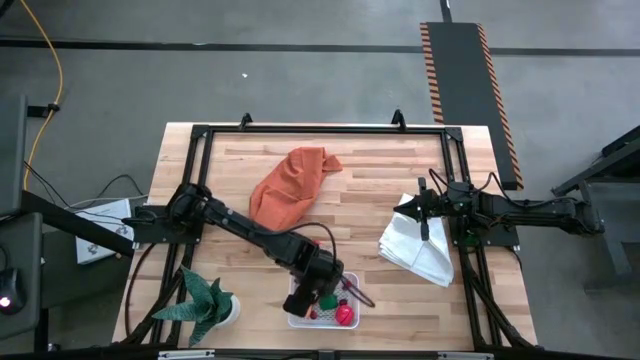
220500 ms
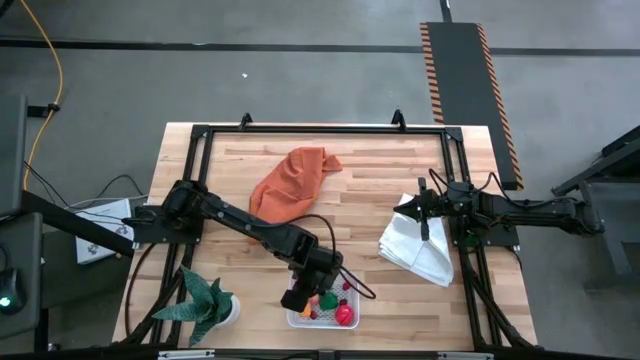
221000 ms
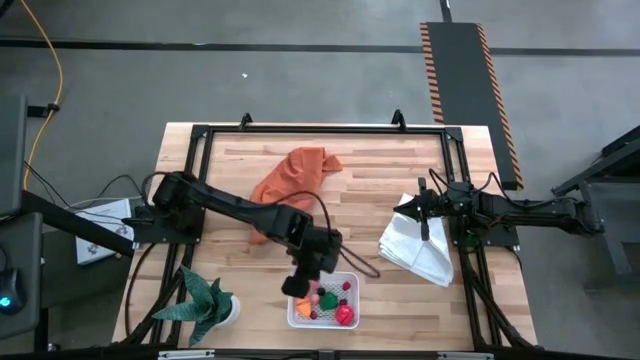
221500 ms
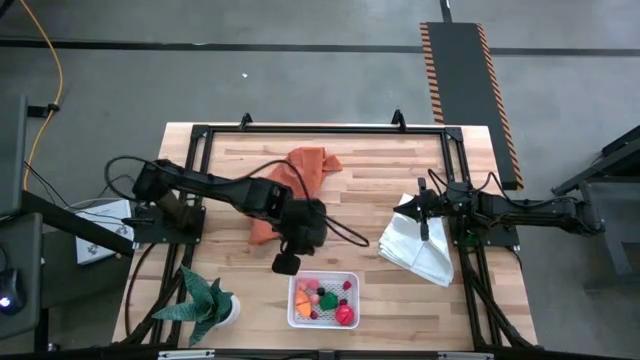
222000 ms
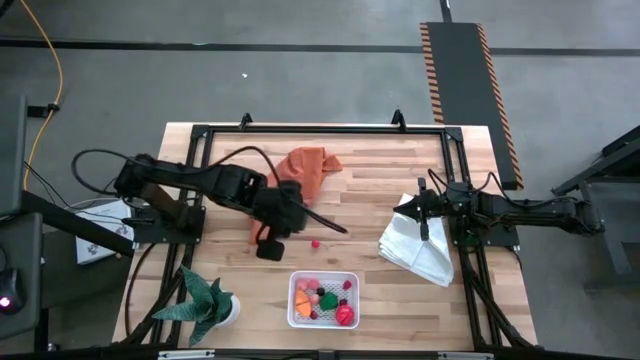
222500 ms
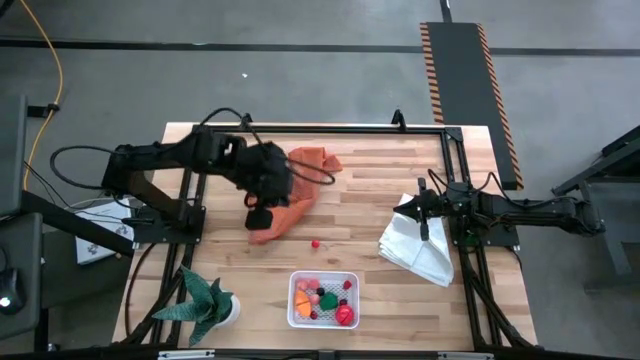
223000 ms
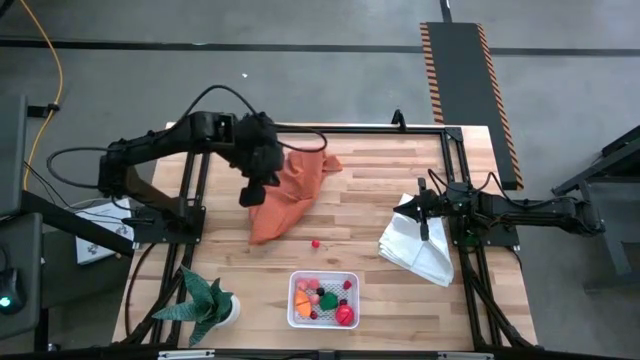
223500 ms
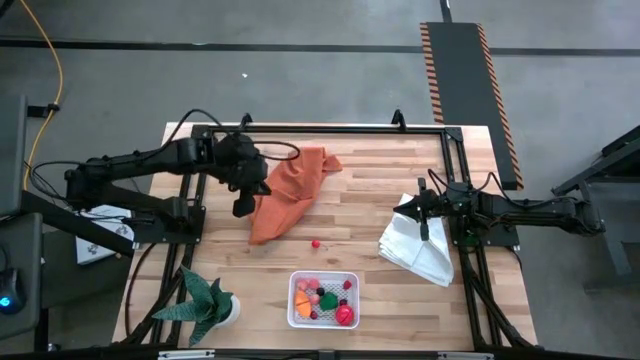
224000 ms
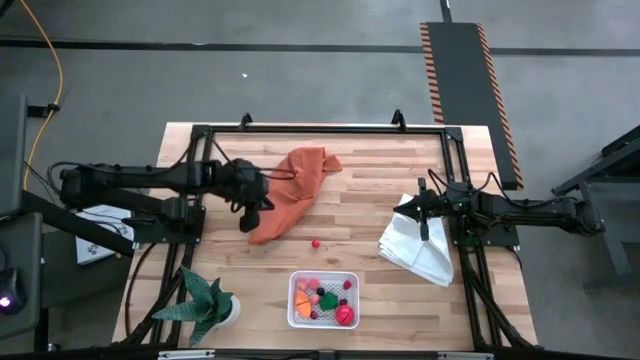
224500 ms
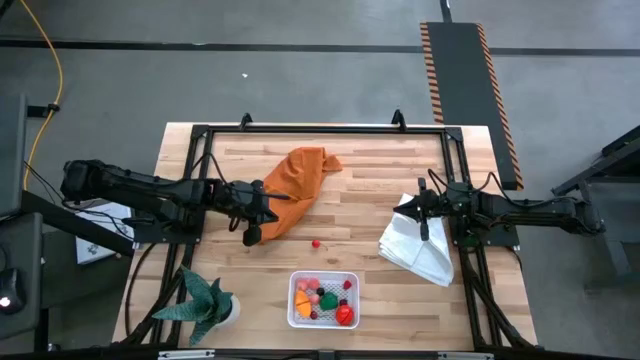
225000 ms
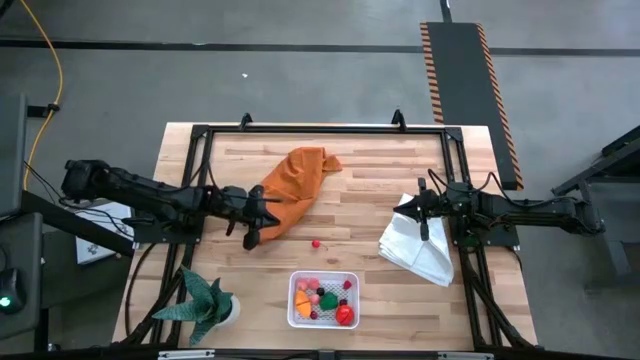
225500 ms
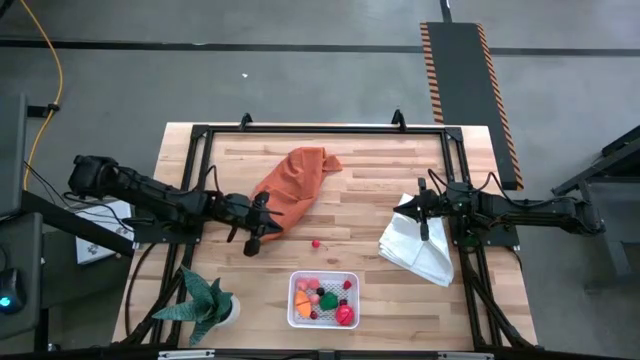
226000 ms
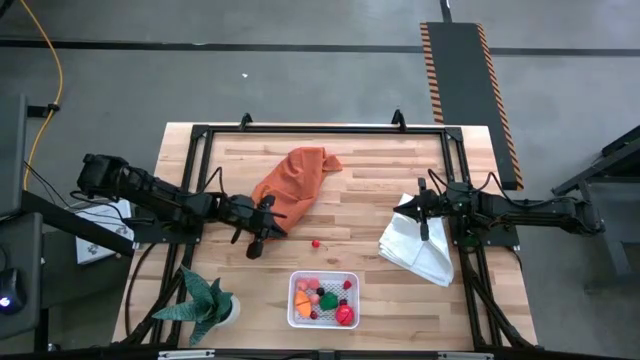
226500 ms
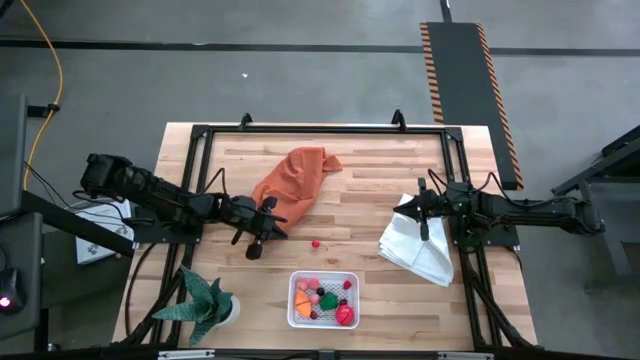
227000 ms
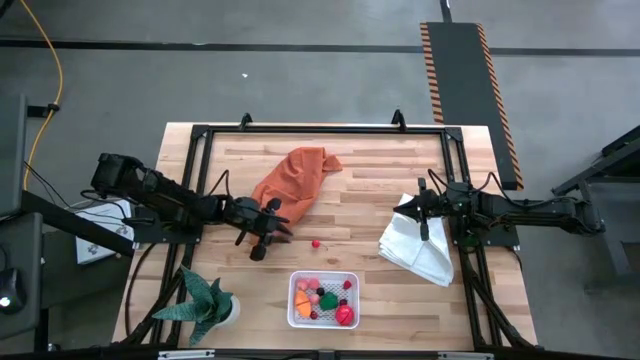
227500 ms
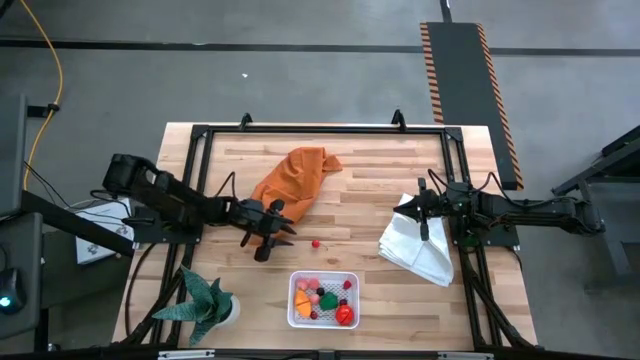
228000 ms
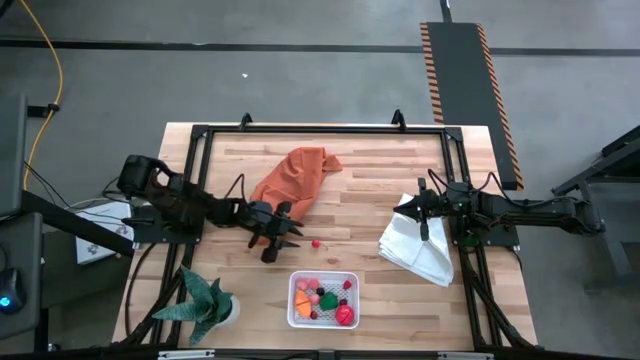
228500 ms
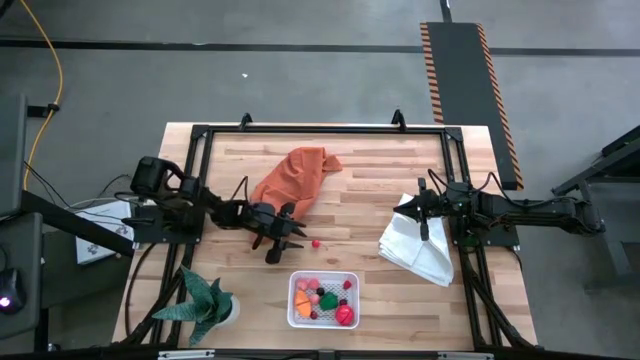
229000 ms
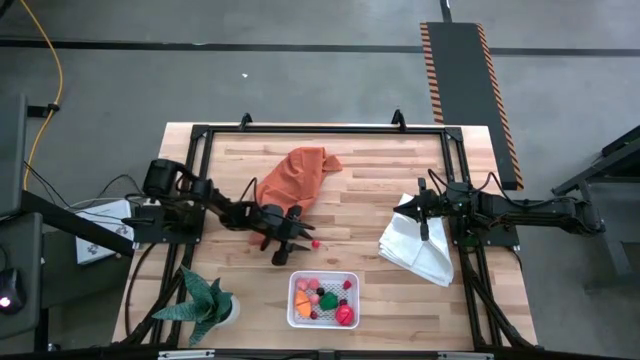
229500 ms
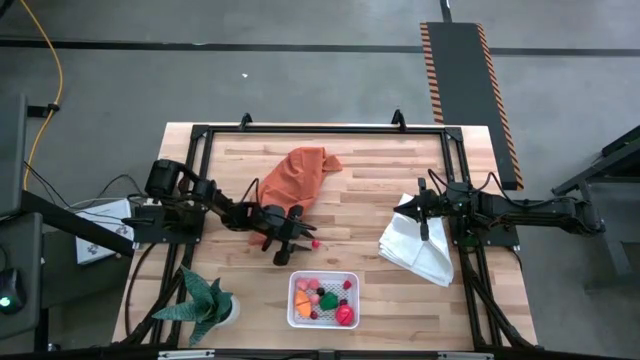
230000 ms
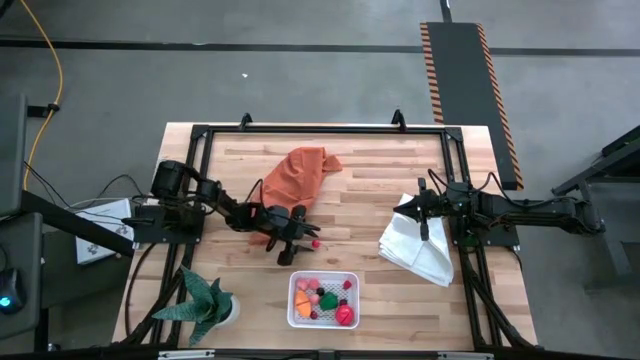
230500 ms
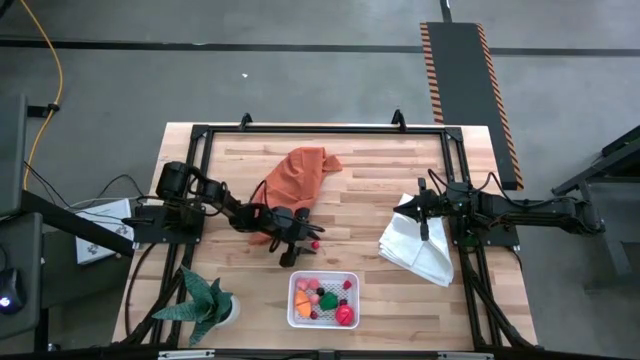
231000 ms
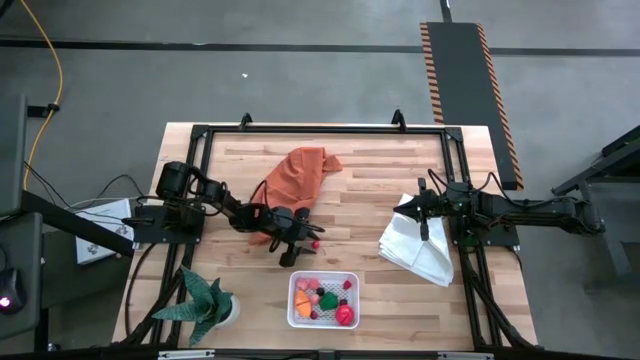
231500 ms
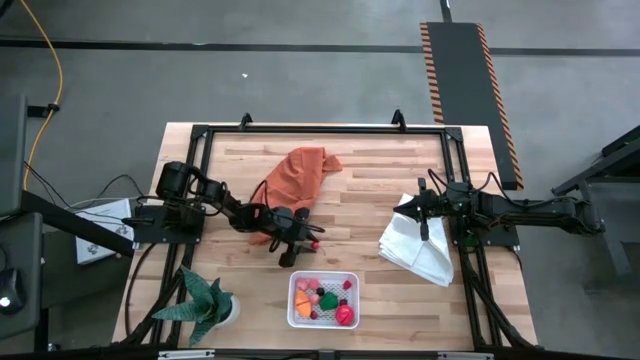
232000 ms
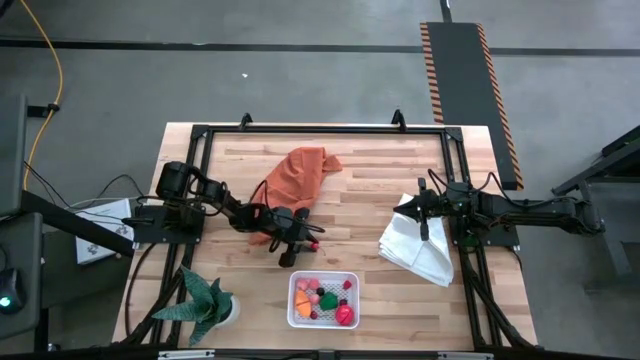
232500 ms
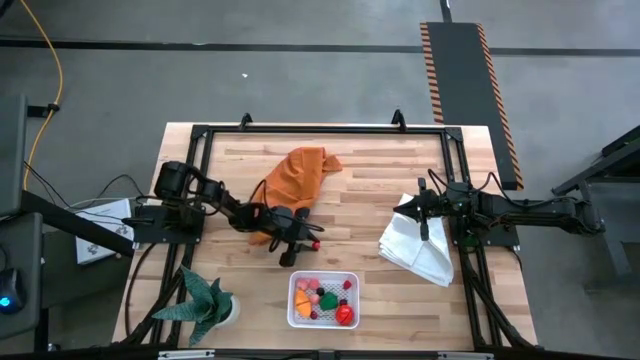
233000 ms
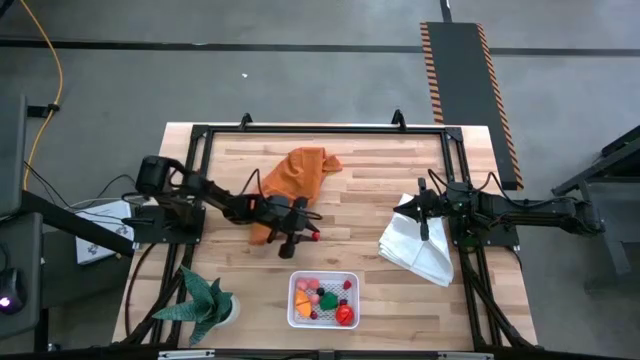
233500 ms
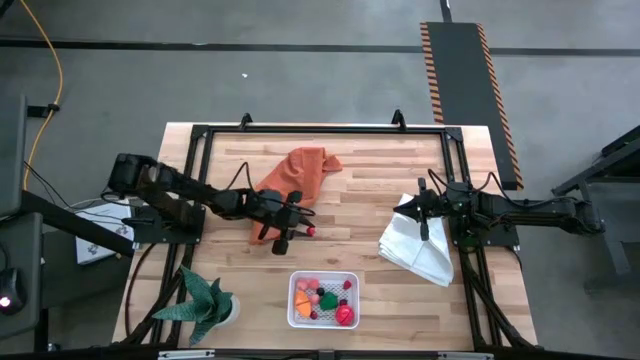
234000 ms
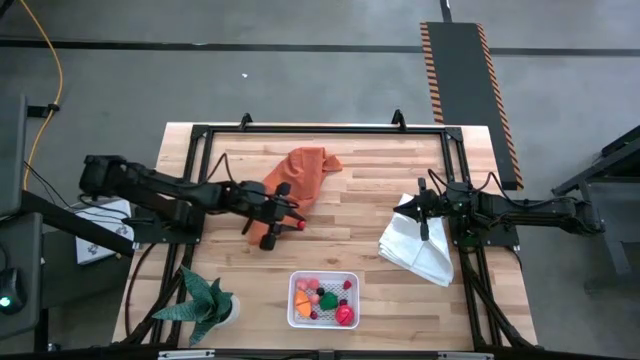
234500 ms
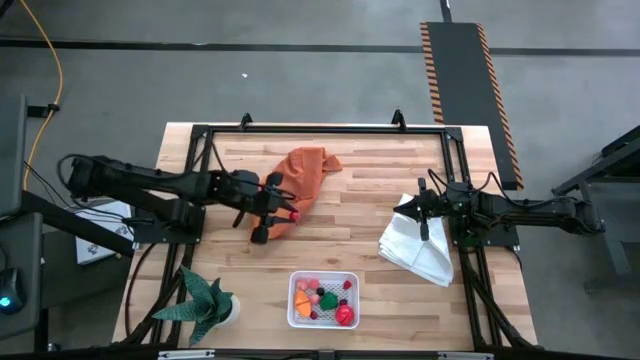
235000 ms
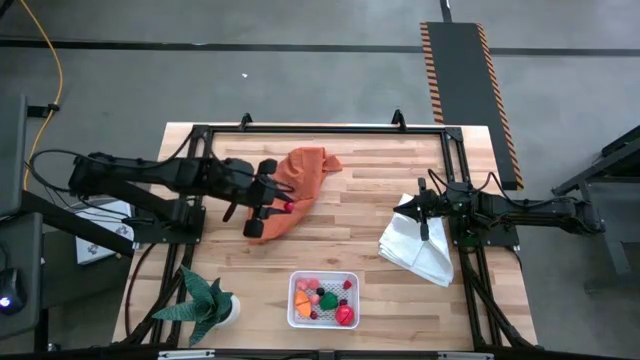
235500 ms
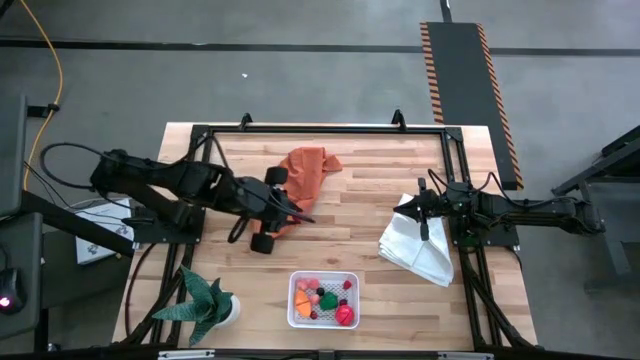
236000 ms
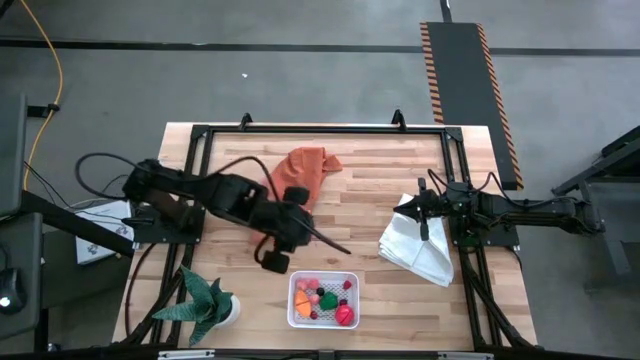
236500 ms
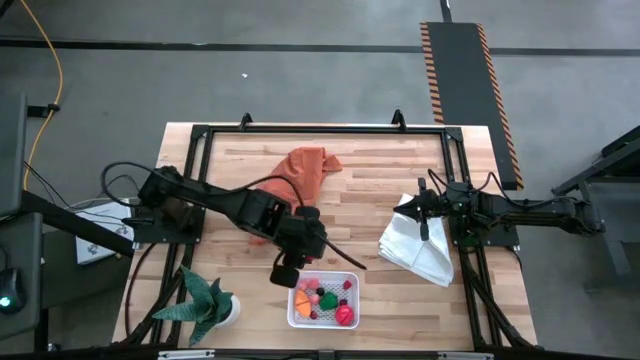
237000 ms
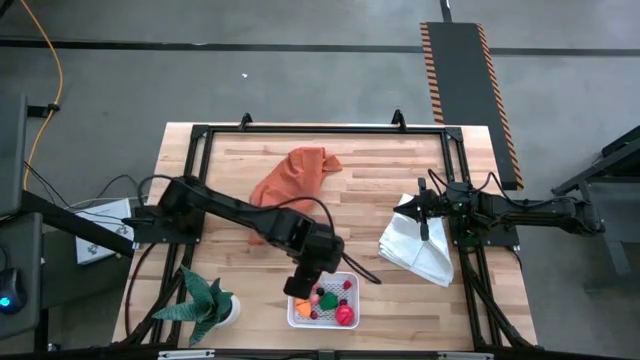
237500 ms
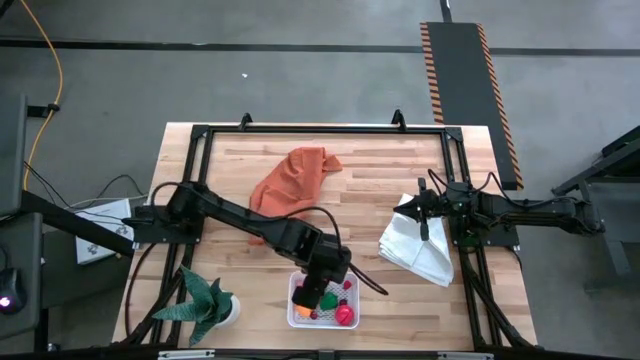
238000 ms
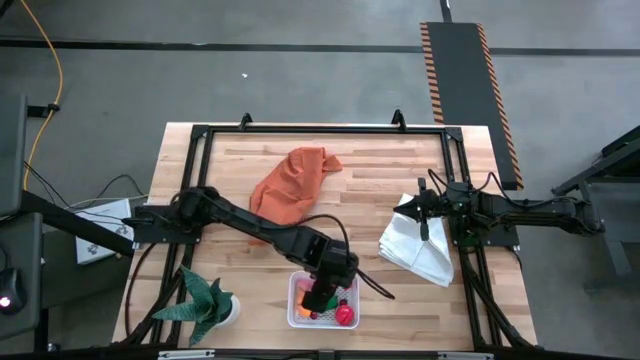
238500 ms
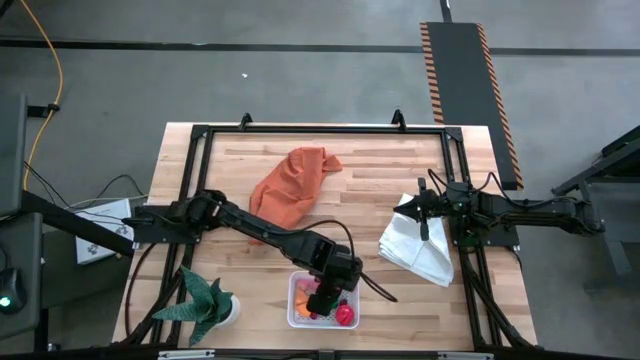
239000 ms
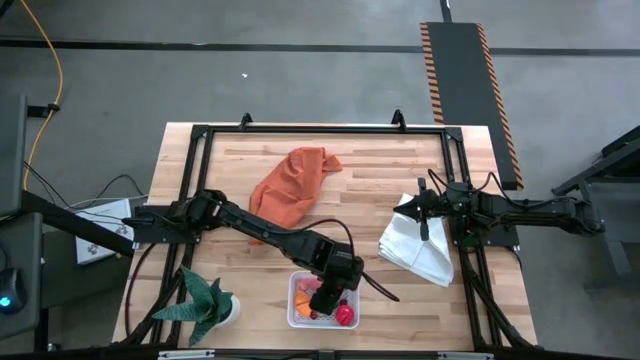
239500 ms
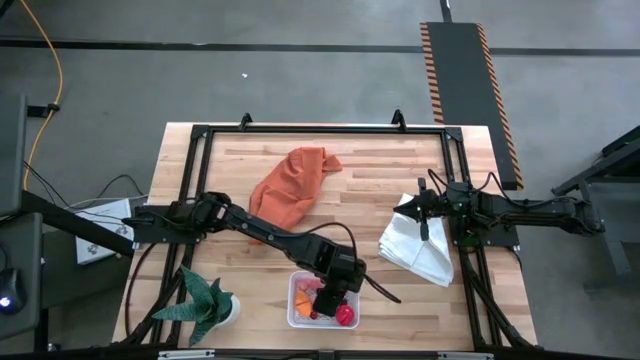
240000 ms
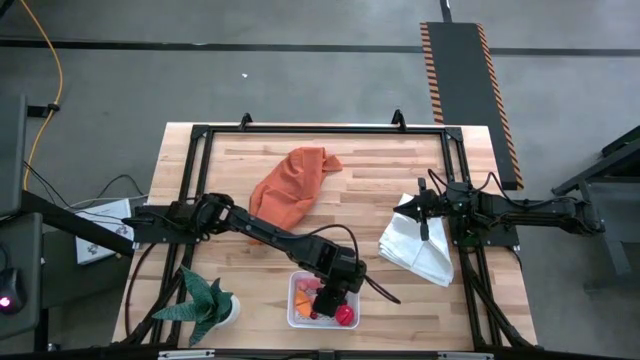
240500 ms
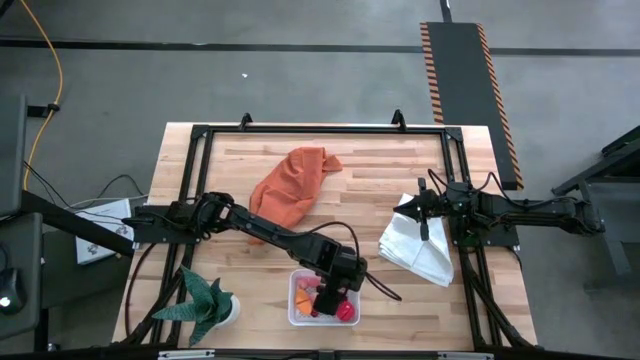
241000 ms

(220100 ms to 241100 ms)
Task: Pick and placing Produce into tupperware
Put the red cherry into the white bin

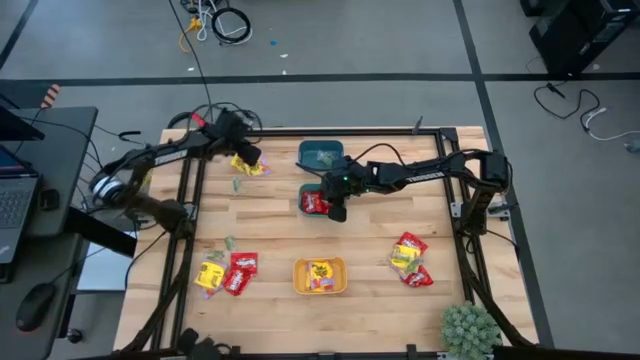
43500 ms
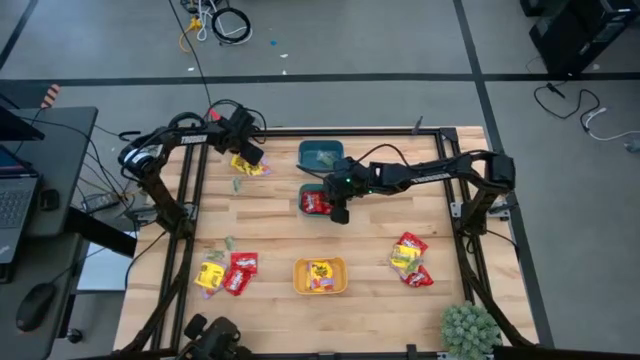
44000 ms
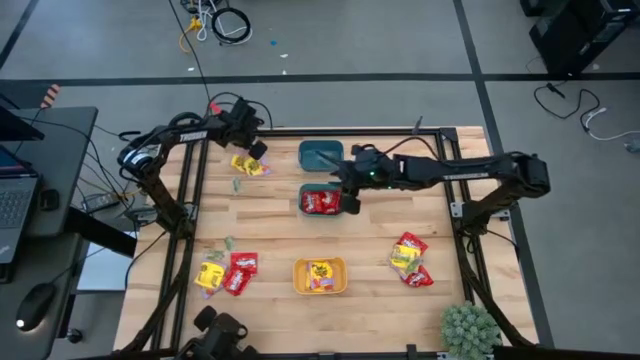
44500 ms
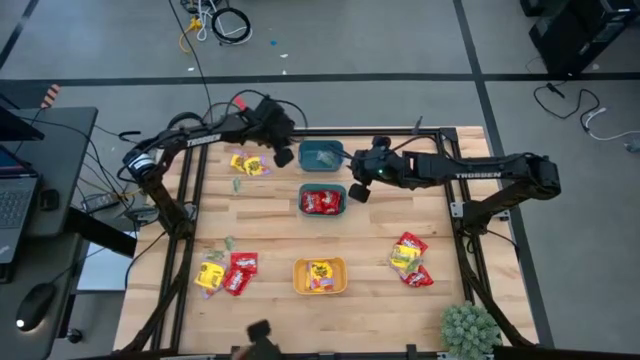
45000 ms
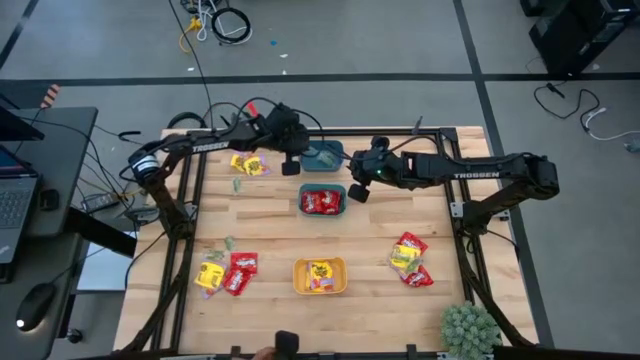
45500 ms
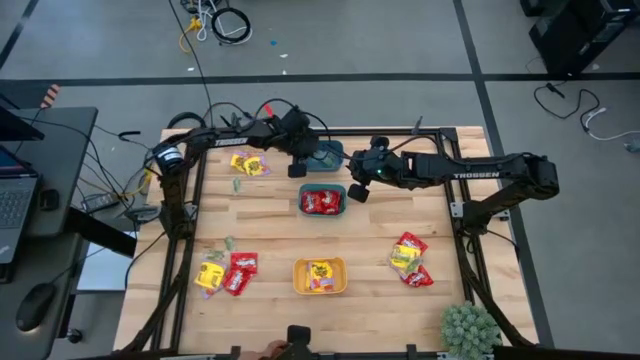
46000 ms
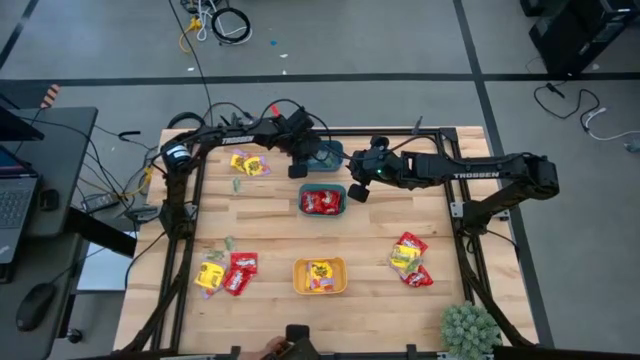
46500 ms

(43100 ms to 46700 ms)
Task: Sort candy
Put the green gummy into the blue bin
